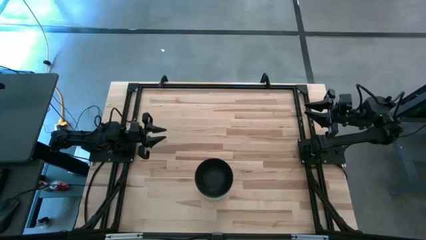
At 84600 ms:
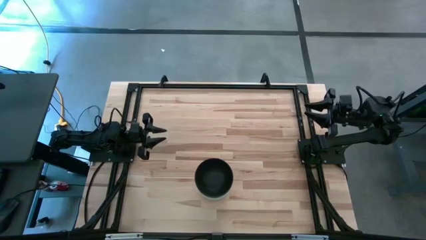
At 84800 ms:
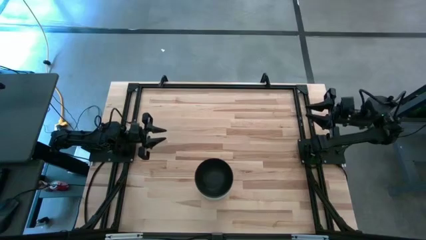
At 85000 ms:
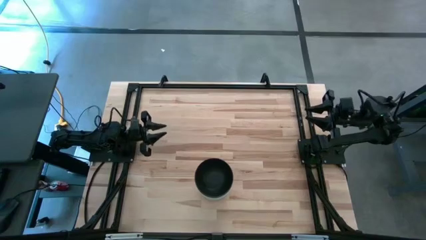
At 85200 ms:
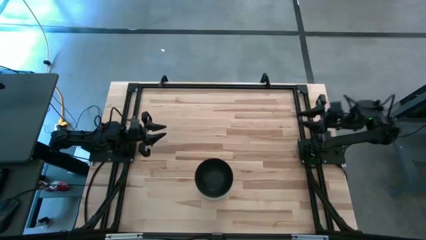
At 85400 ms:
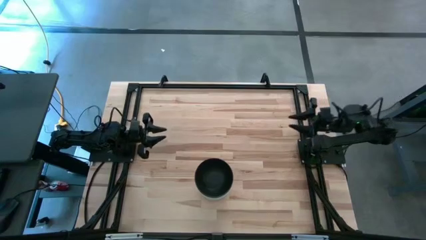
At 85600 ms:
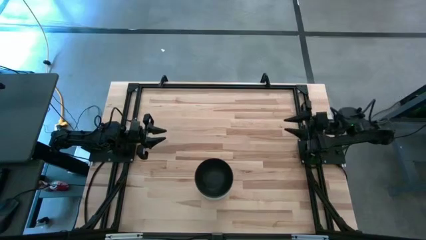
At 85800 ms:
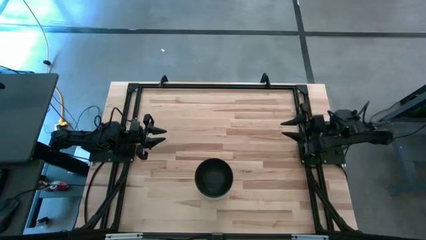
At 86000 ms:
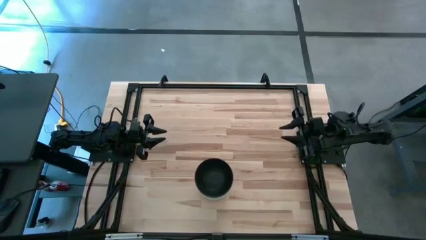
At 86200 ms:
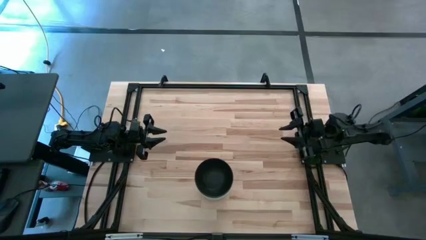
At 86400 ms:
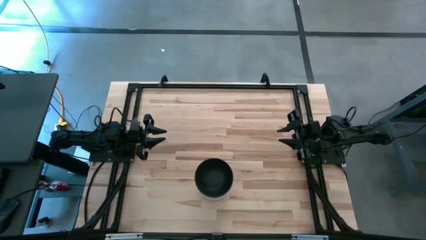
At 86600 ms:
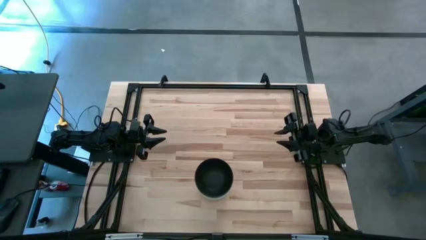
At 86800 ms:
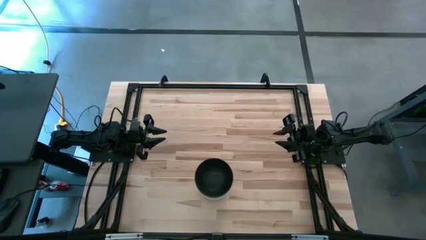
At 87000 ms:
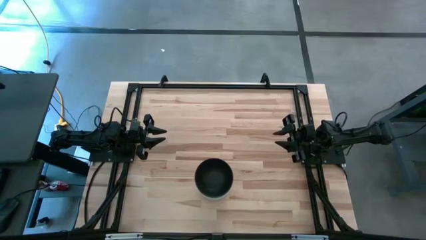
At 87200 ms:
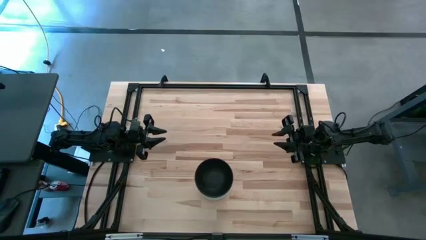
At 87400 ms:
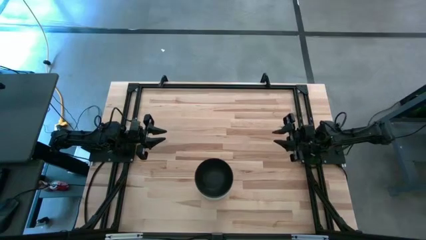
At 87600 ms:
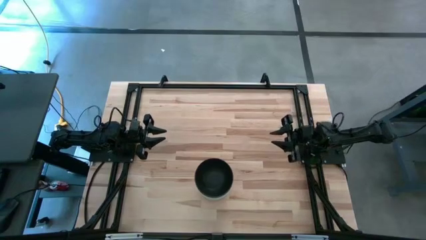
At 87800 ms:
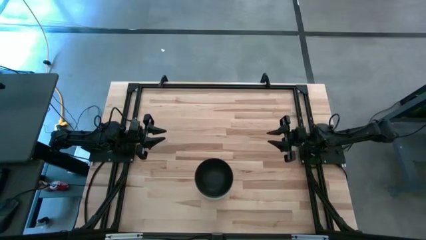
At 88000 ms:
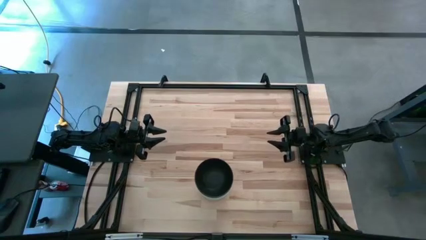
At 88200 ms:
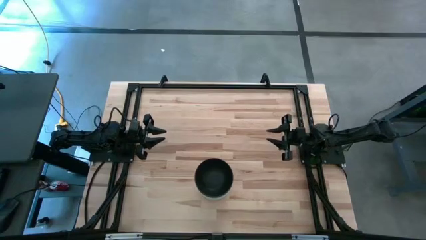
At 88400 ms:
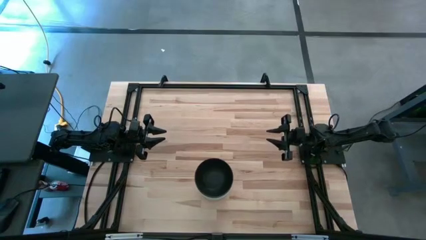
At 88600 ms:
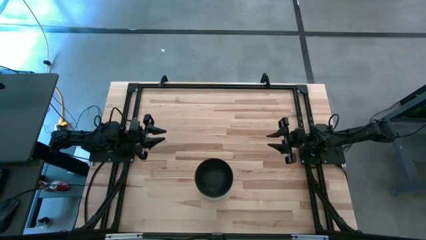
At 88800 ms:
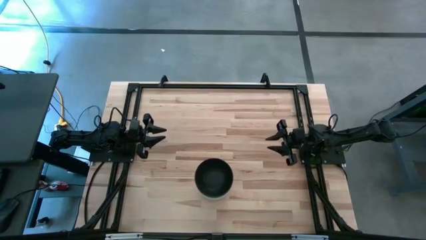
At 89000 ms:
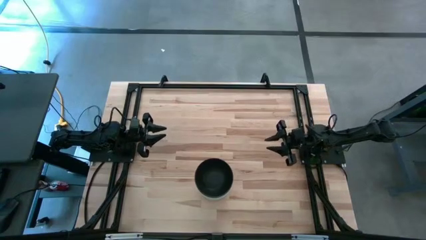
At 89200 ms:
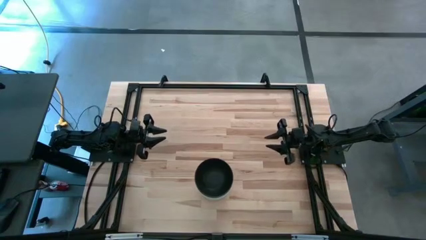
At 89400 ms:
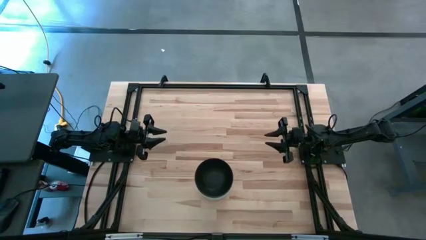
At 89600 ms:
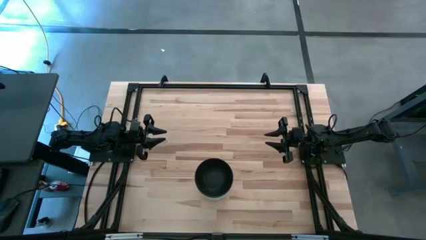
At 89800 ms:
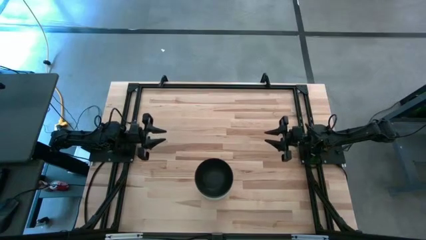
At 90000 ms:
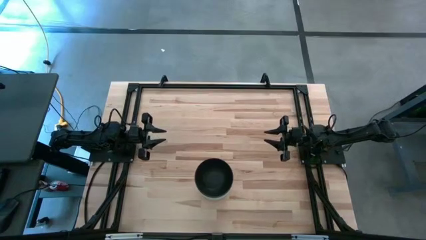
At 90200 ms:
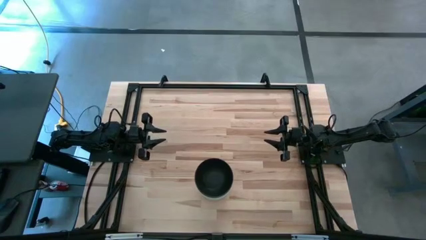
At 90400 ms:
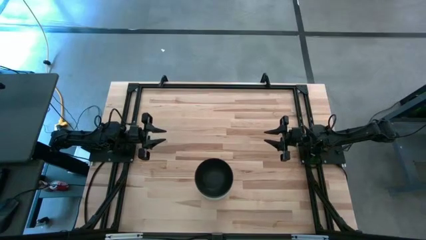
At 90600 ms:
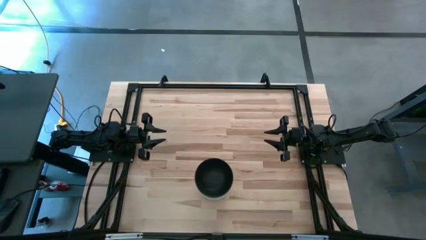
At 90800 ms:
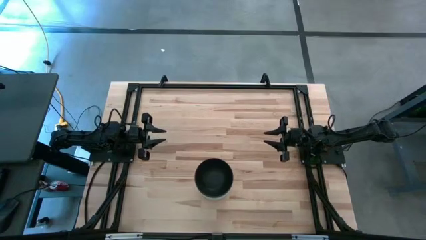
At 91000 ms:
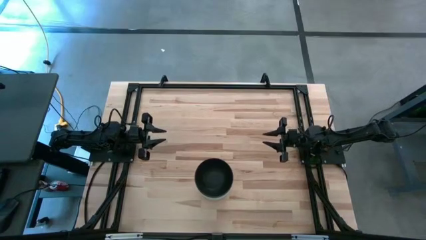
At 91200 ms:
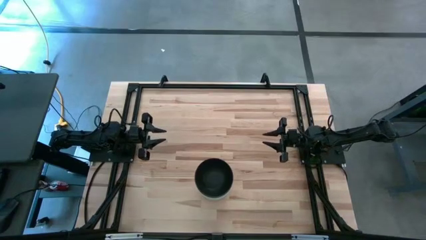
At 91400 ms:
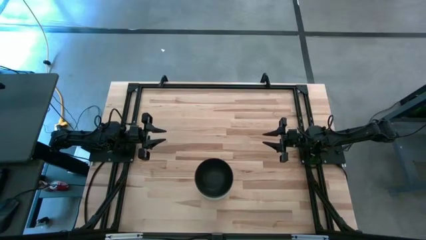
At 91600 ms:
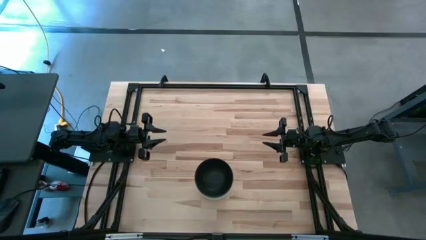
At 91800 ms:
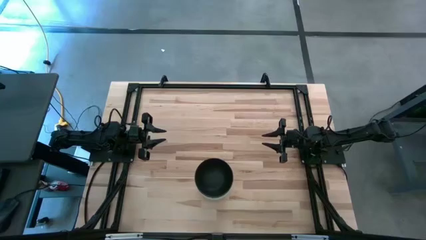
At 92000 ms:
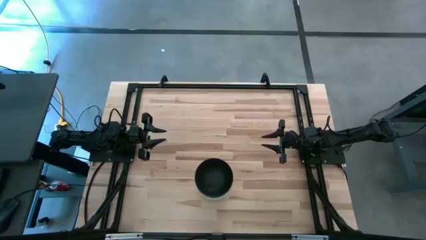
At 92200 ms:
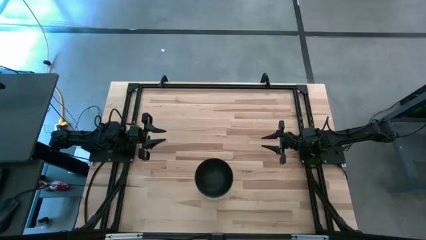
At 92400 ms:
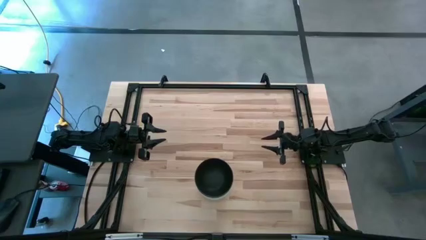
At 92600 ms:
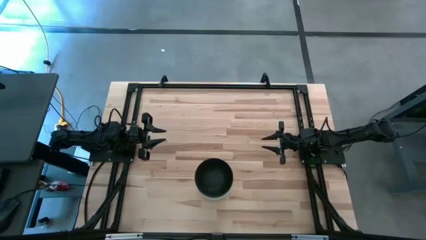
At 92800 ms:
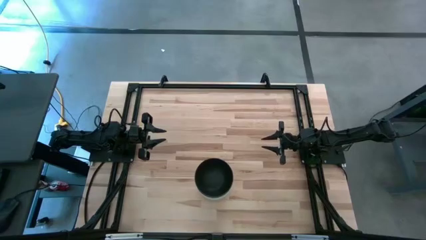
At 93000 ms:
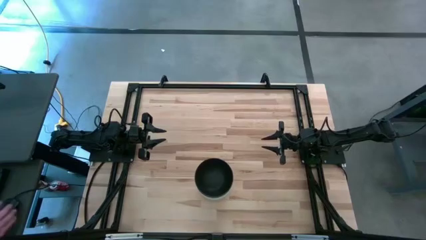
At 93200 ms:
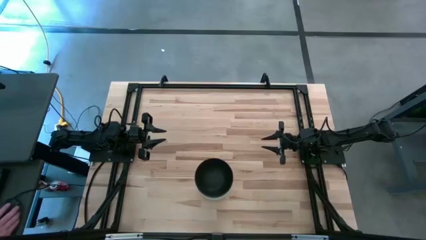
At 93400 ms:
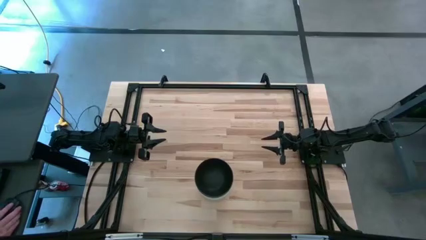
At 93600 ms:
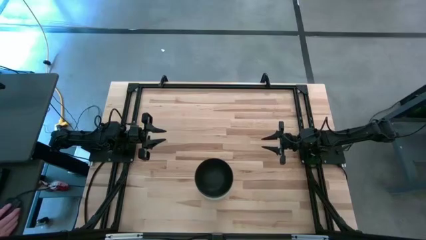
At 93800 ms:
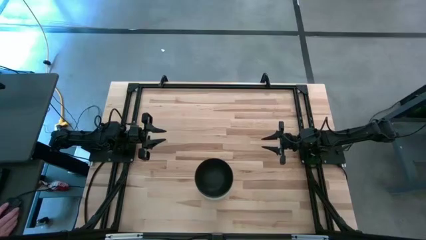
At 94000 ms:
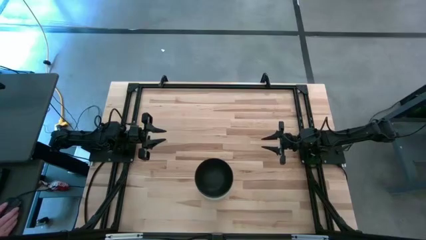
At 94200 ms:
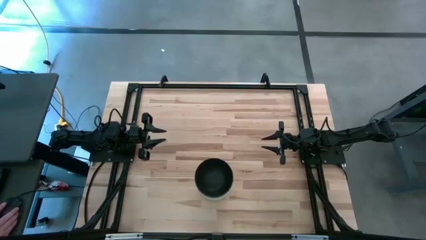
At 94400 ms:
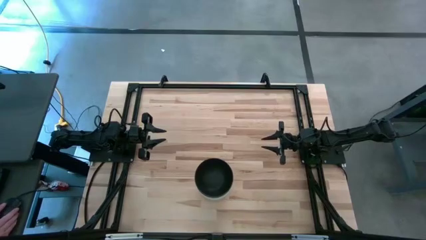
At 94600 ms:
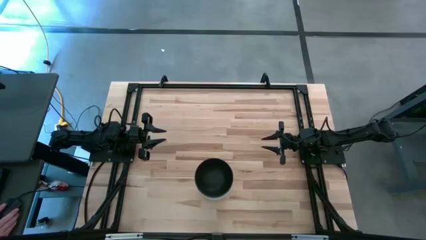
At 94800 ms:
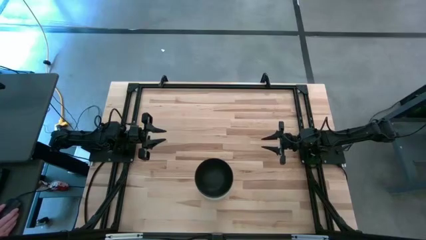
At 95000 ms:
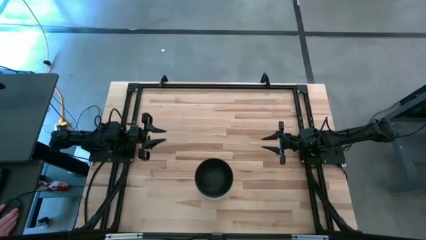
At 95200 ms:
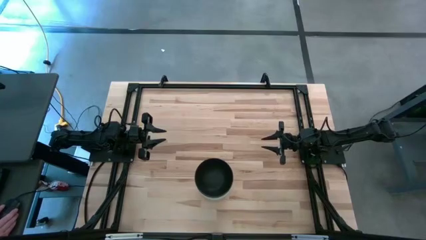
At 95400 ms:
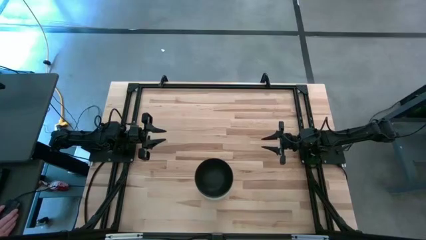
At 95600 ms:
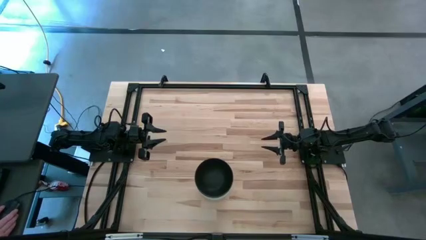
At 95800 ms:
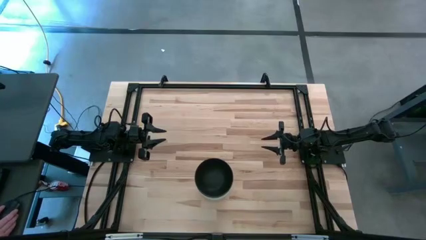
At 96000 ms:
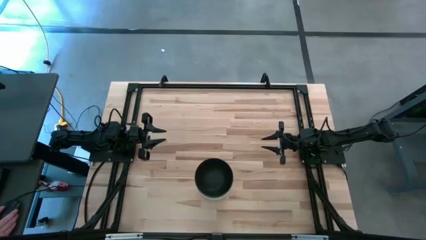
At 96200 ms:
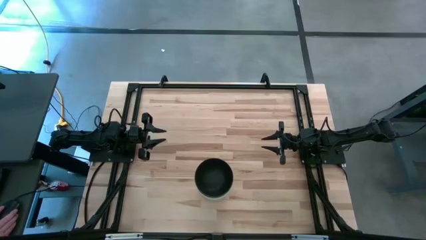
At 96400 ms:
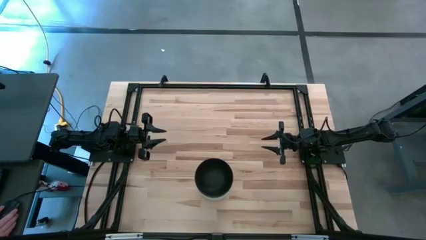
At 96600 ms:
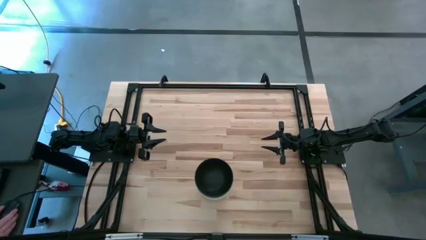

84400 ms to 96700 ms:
Task: Nest bowls inside each other
Return to Home Position
